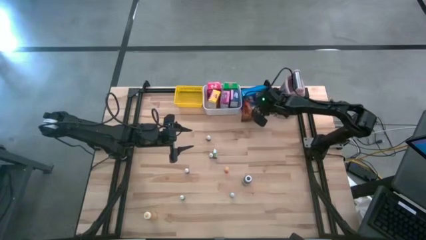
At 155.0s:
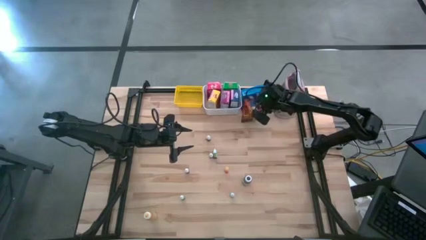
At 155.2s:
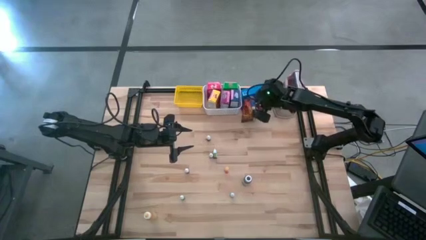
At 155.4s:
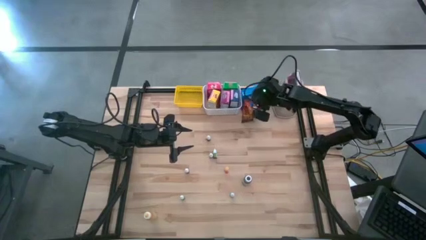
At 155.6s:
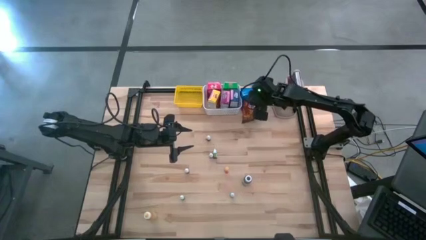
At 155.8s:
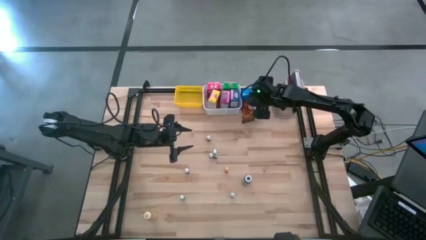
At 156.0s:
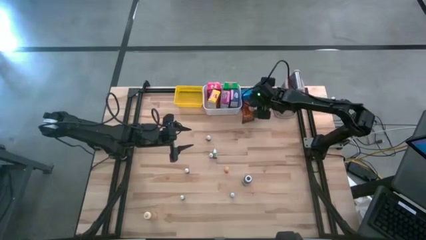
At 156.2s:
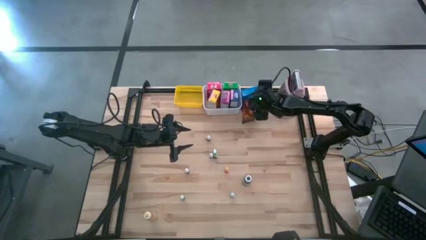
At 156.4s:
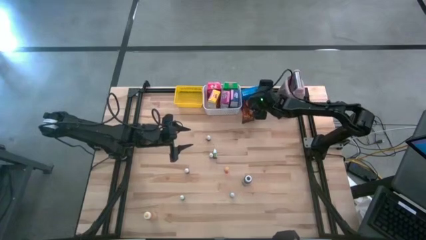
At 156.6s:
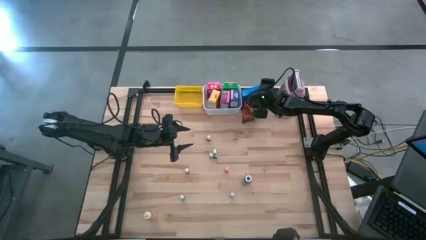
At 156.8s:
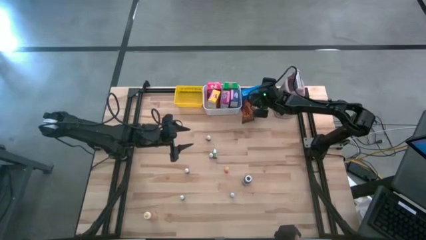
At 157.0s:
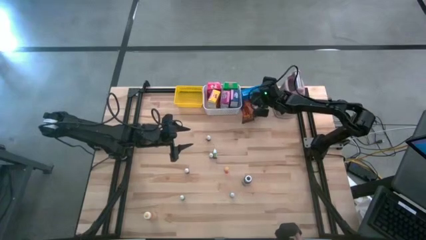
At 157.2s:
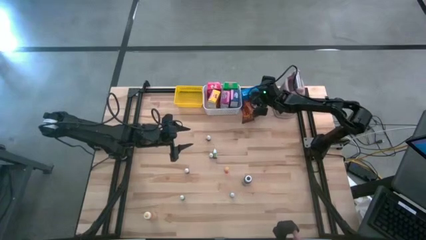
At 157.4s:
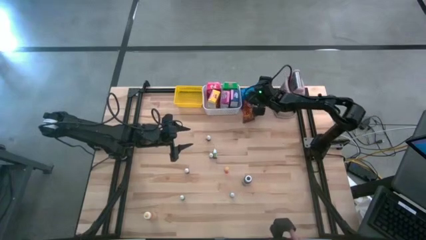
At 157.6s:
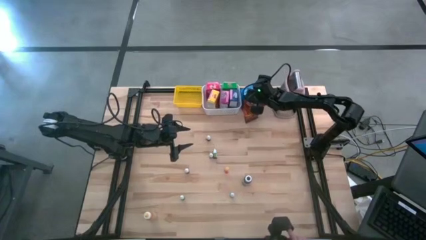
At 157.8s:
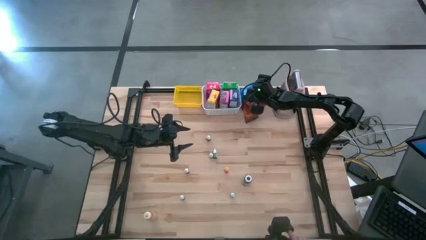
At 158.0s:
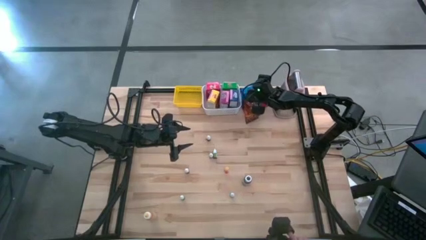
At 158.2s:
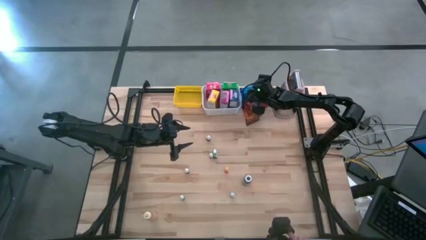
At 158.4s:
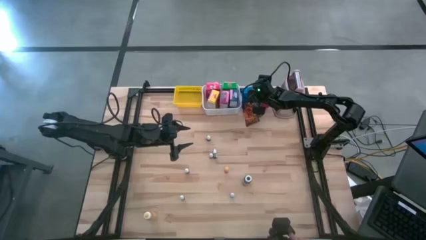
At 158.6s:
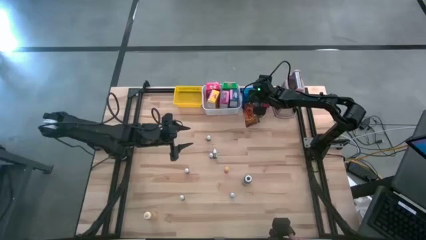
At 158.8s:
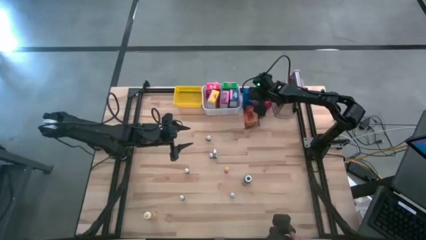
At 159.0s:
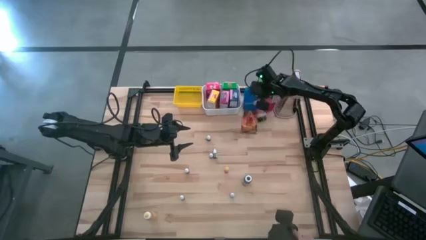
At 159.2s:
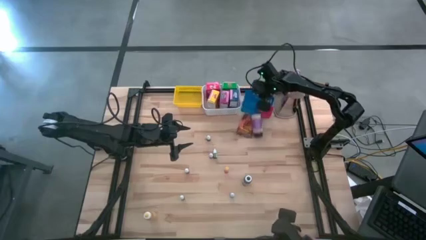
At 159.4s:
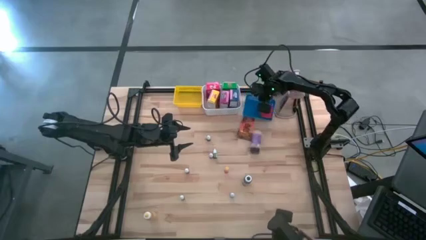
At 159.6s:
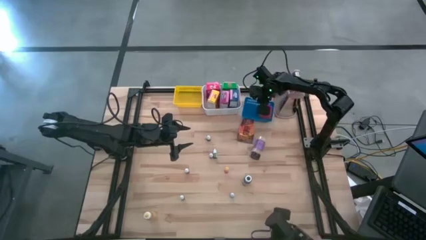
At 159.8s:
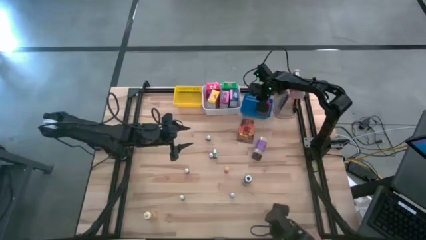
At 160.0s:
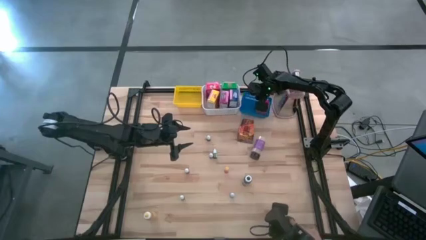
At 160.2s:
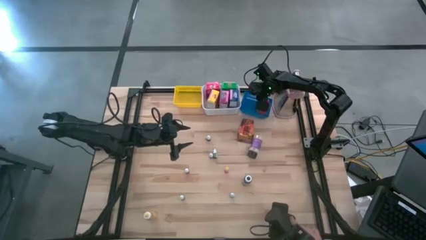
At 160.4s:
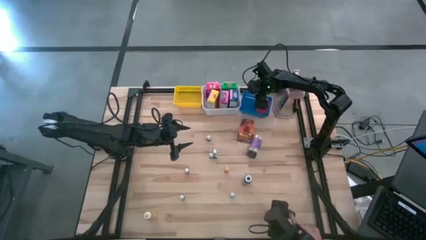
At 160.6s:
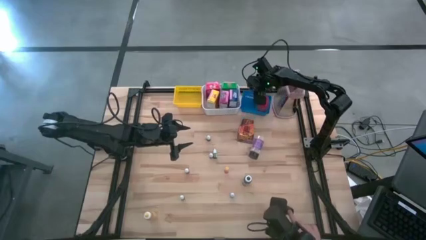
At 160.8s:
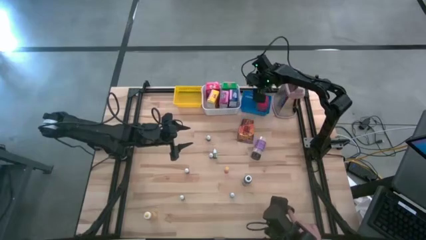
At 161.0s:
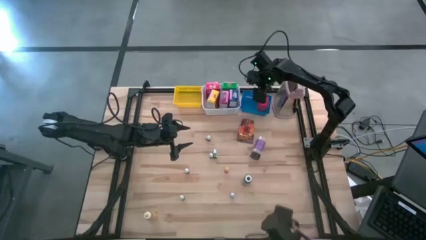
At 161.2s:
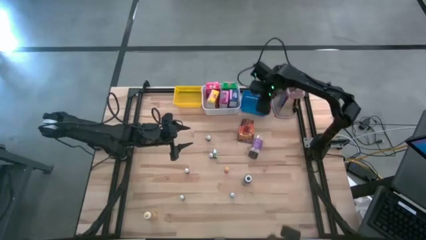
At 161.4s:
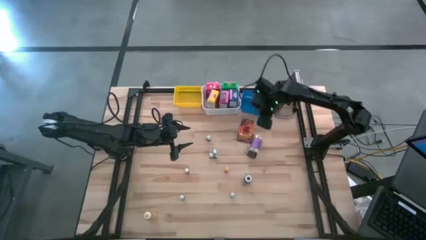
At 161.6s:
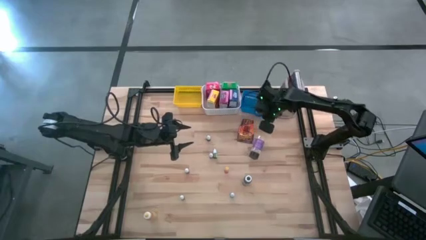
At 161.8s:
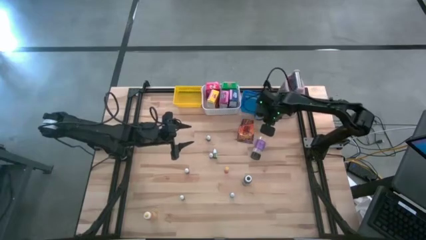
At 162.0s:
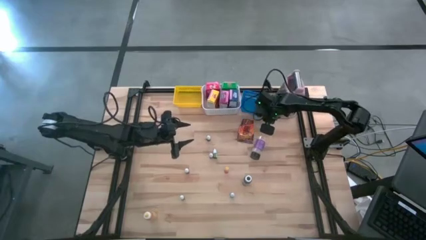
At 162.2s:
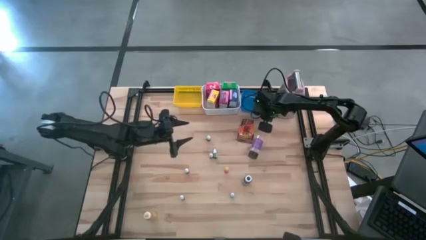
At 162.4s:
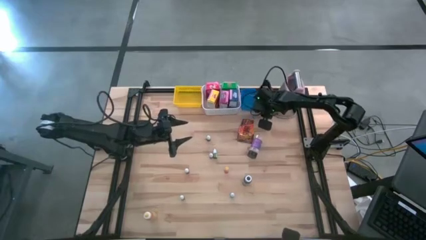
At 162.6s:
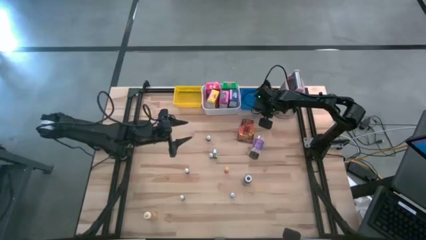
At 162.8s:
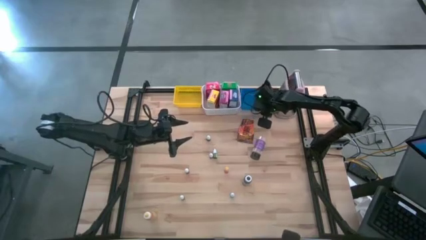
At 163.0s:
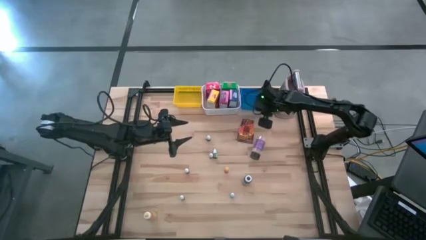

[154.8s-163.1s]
Task: Pick & Place Kitchen Items
Adjust the blue basket on the table

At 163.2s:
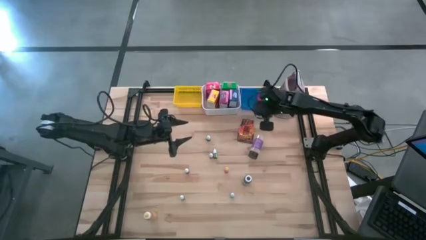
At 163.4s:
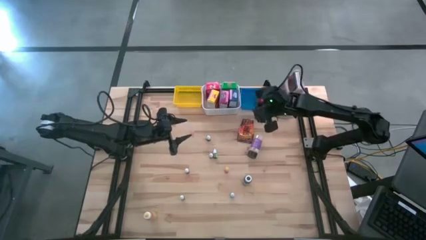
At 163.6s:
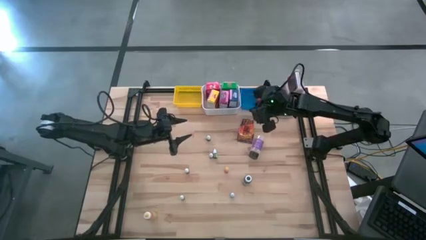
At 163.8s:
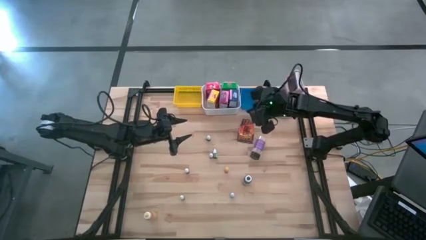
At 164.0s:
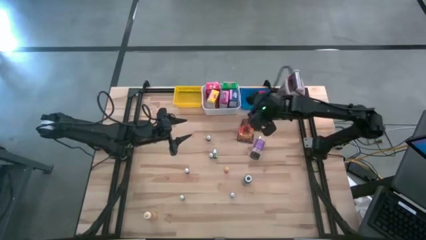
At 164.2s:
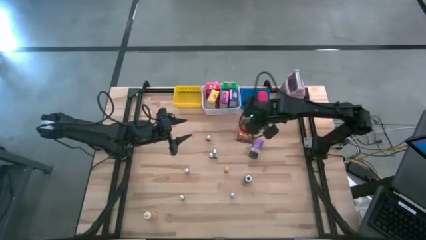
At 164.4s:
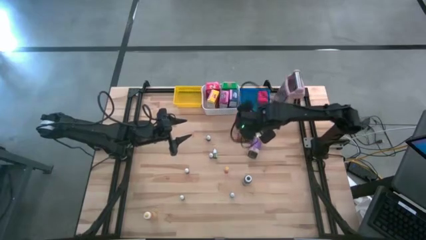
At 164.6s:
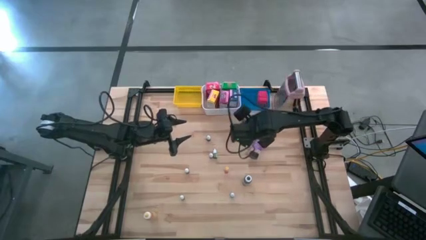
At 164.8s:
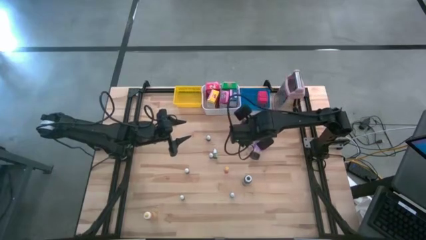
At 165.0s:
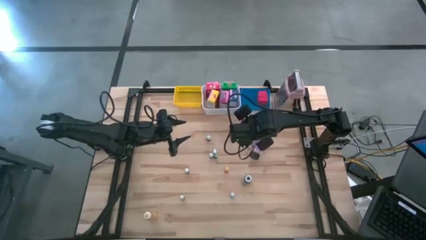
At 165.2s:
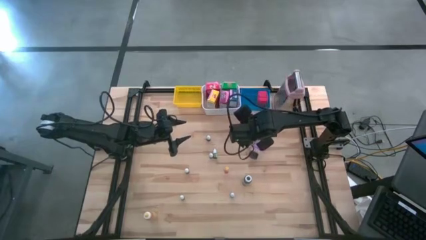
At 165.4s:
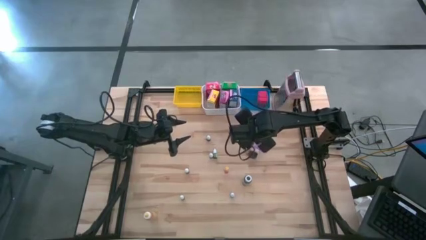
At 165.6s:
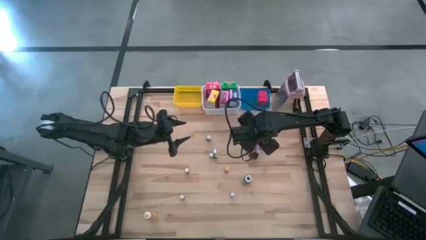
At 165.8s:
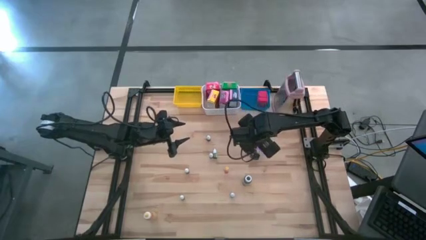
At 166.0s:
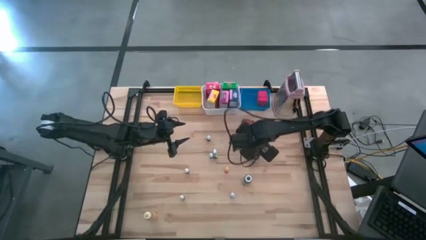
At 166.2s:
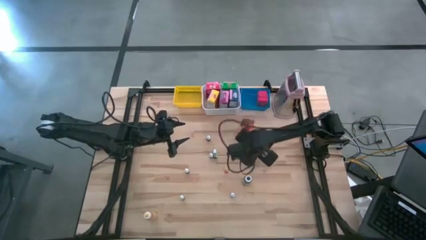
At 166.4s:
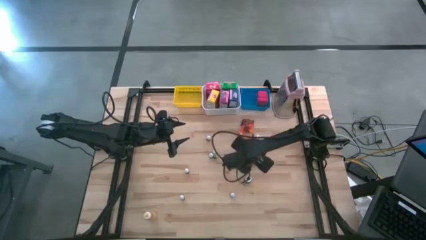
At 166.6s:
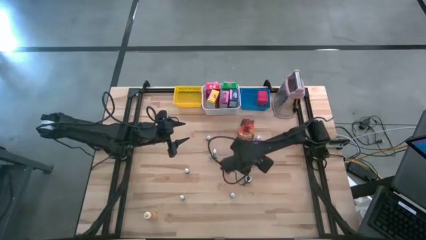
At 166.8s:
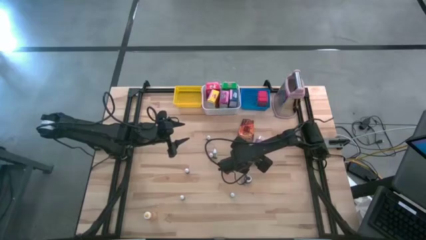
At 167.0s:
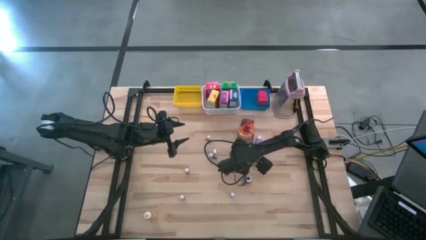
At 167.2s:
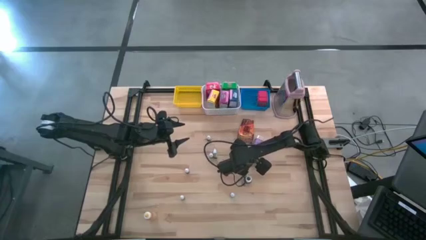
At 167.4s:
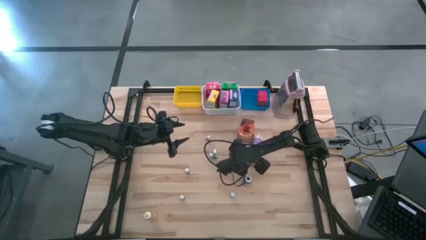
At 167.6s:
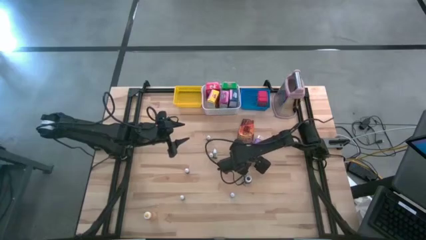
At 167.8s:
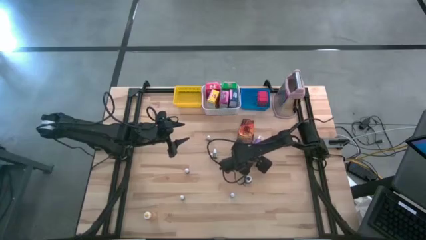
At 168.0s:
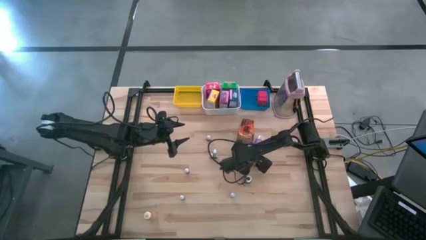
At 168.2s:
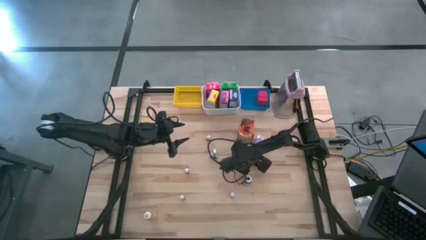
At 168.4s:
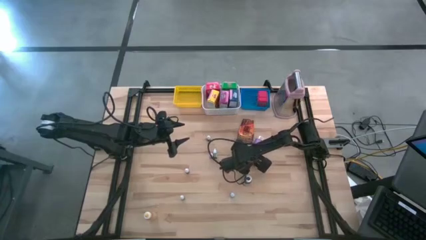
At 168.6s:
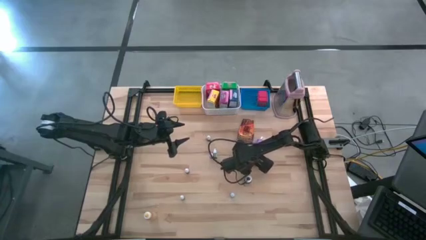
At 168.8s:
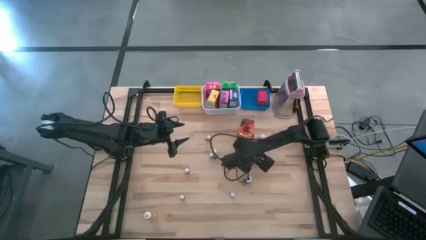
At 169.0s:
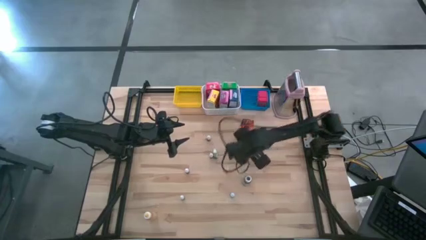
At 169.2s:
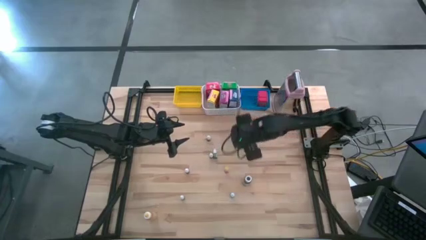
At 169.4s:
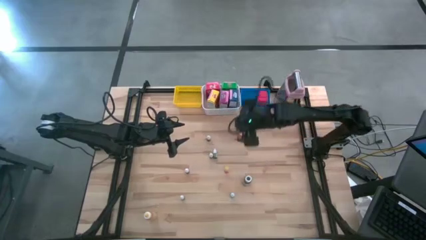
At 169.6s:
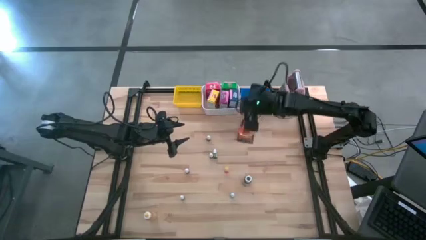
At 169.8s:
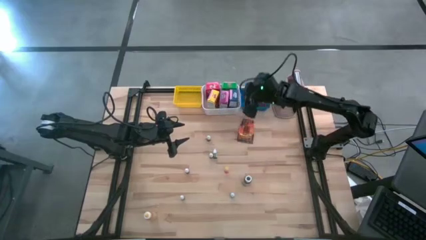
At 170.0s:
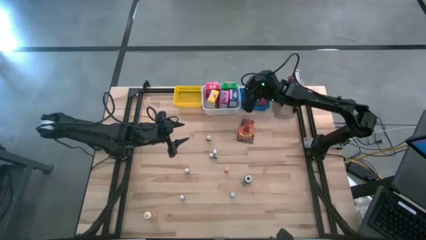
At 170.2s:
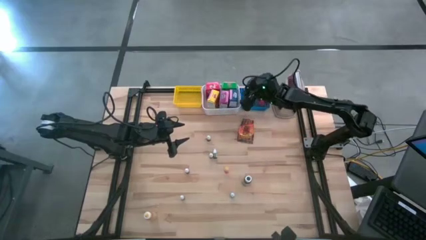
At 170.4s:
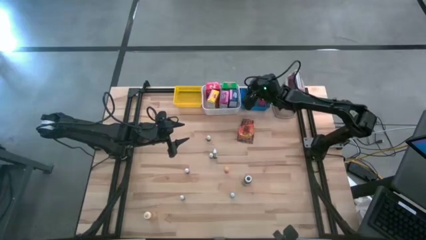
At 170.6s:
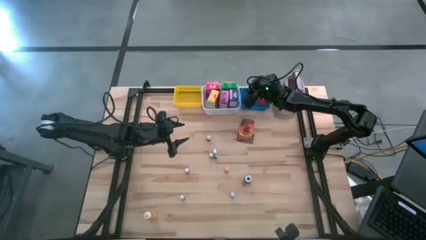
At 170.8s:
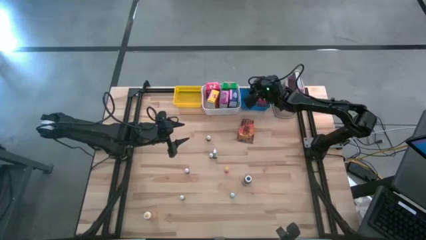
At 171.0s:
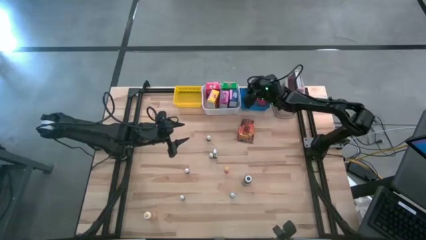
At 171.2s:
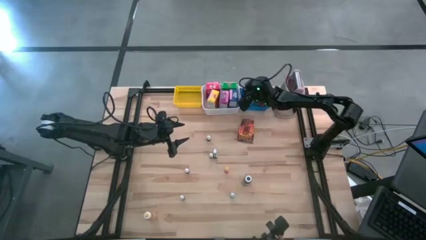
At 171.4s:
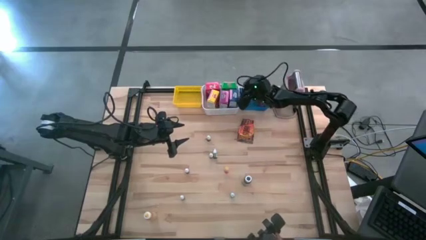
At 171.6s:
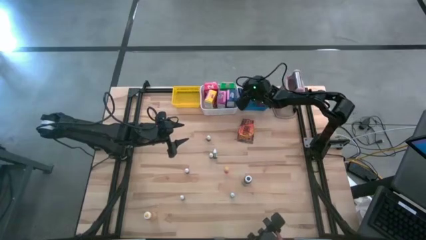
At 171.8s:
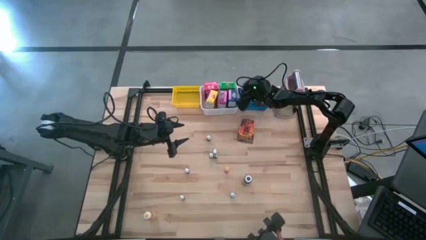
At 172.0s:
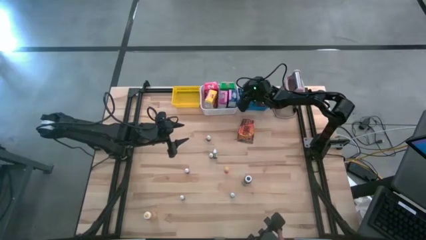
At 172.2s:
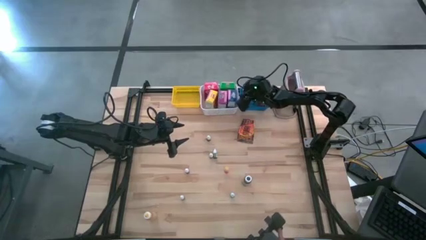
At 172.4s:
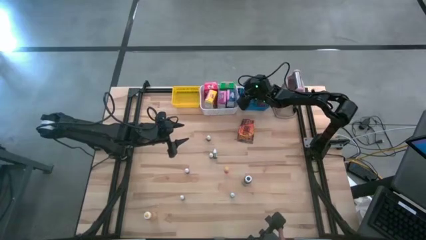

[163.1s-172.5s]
Put the black seasoning bottle into the blue basket
